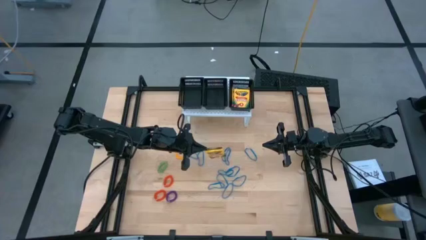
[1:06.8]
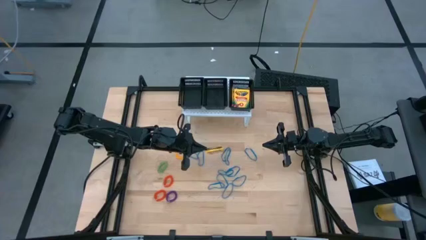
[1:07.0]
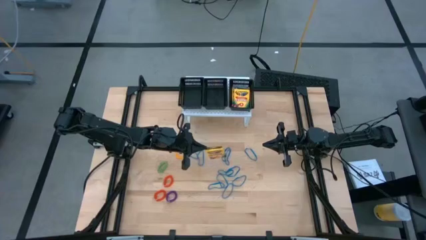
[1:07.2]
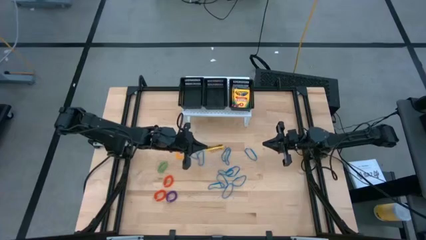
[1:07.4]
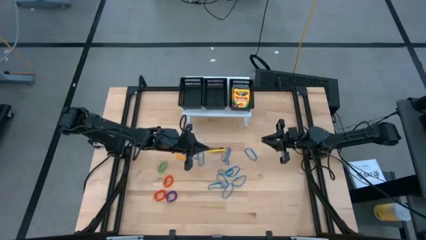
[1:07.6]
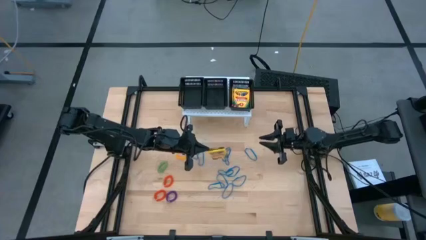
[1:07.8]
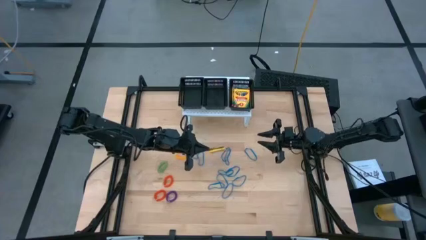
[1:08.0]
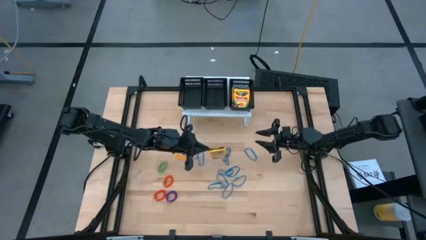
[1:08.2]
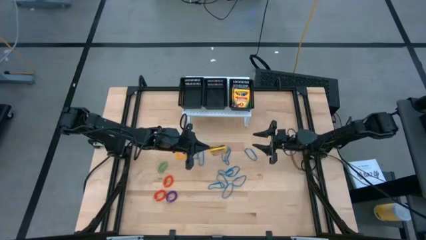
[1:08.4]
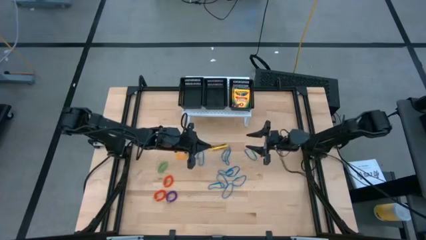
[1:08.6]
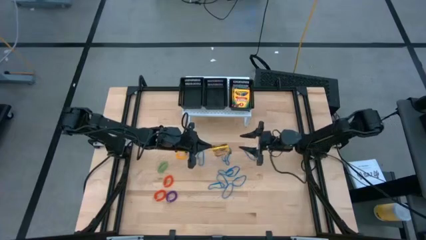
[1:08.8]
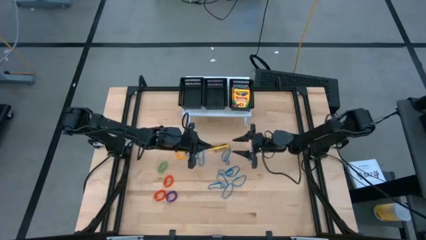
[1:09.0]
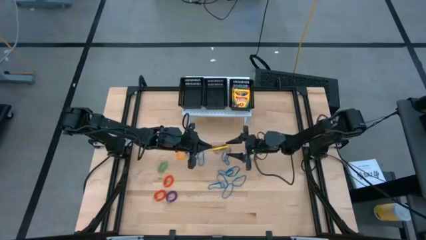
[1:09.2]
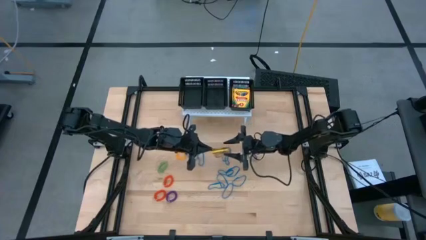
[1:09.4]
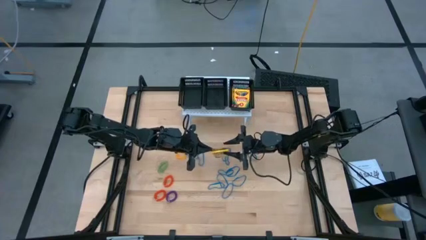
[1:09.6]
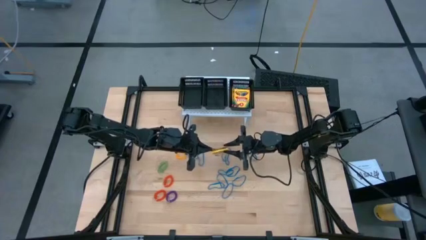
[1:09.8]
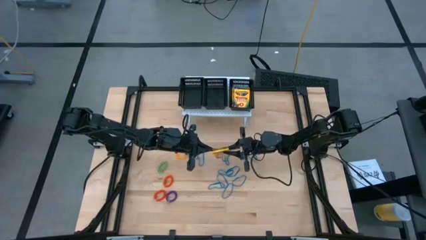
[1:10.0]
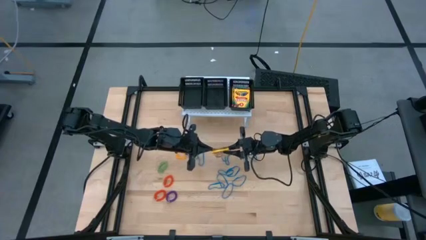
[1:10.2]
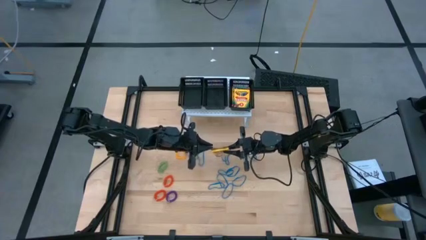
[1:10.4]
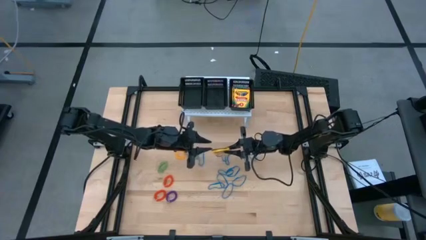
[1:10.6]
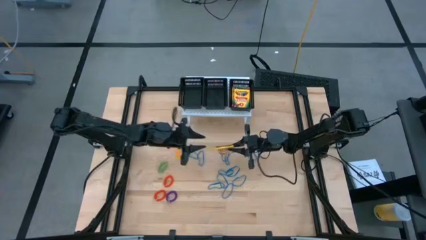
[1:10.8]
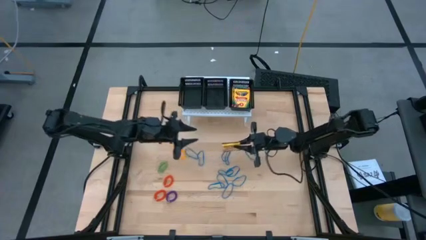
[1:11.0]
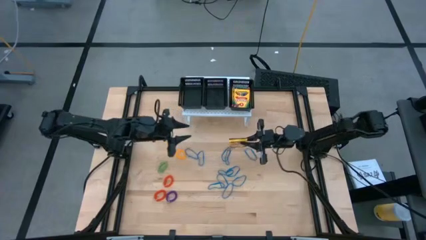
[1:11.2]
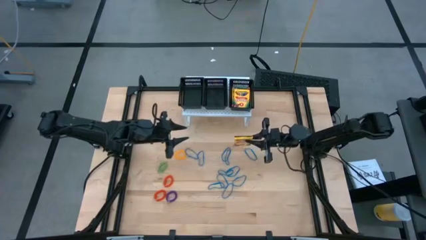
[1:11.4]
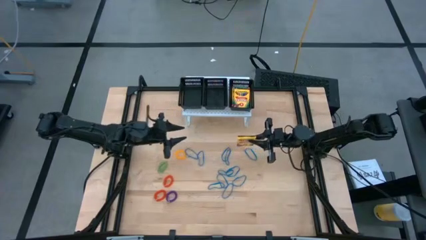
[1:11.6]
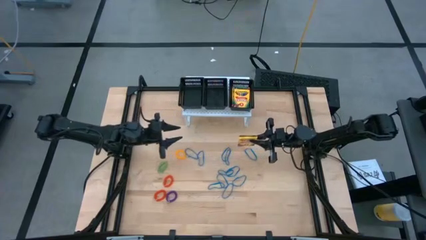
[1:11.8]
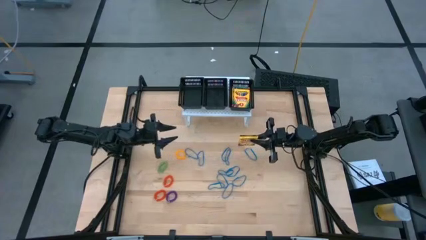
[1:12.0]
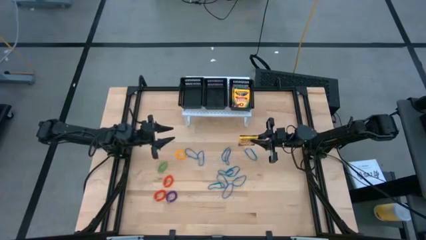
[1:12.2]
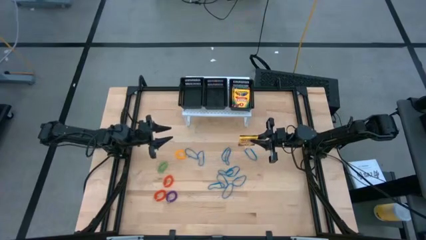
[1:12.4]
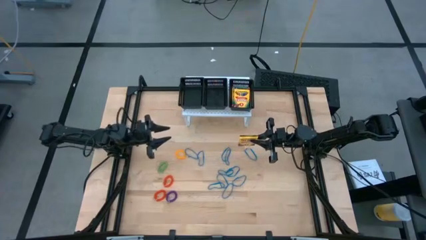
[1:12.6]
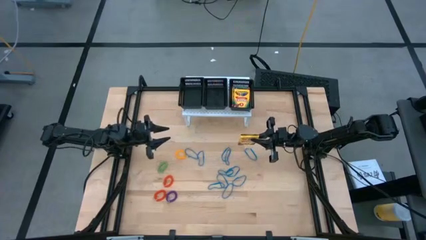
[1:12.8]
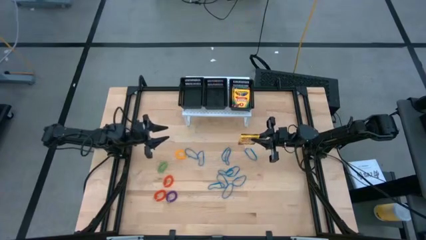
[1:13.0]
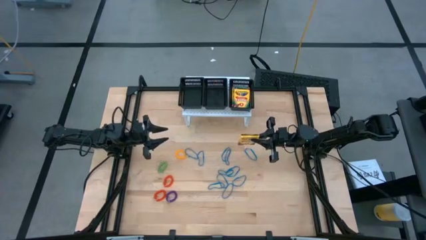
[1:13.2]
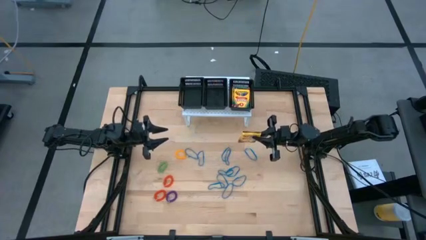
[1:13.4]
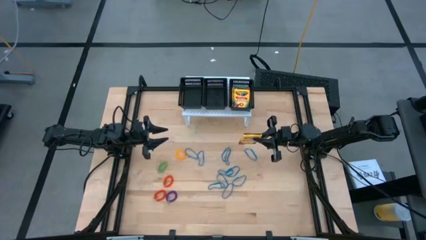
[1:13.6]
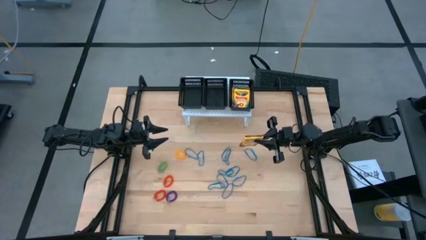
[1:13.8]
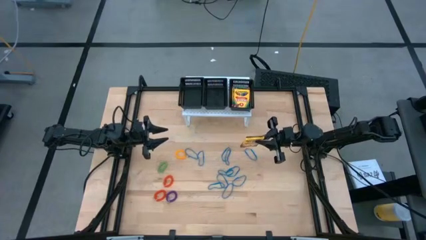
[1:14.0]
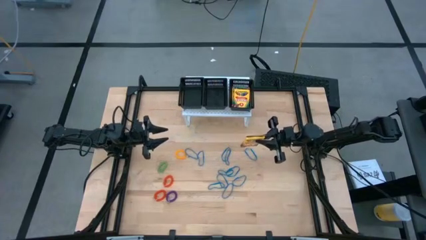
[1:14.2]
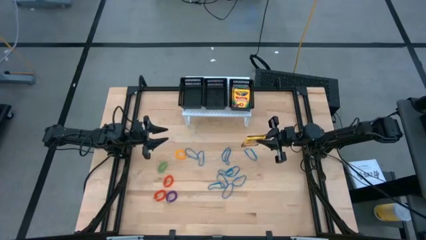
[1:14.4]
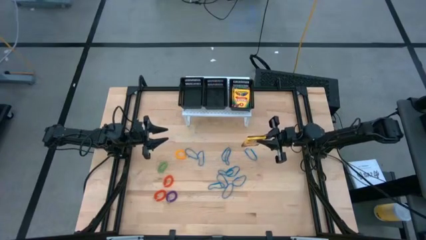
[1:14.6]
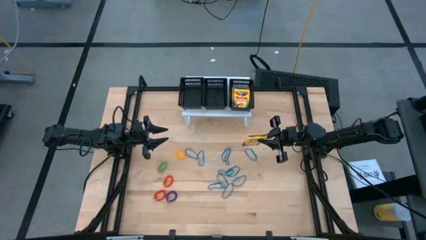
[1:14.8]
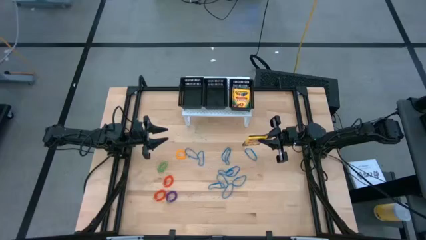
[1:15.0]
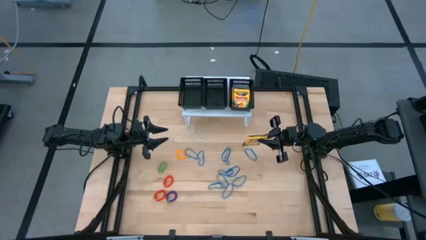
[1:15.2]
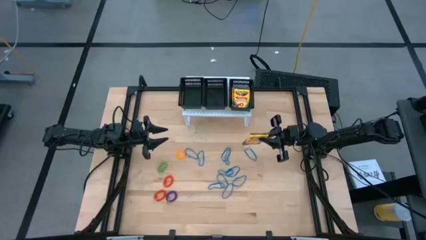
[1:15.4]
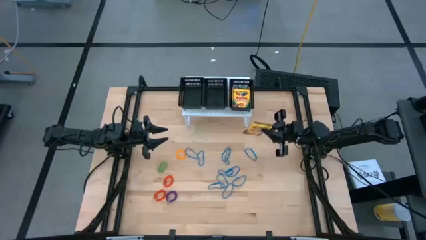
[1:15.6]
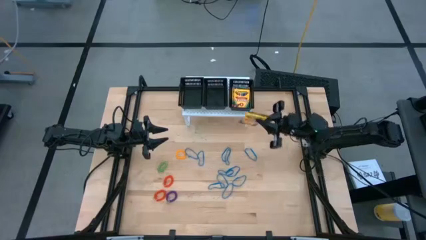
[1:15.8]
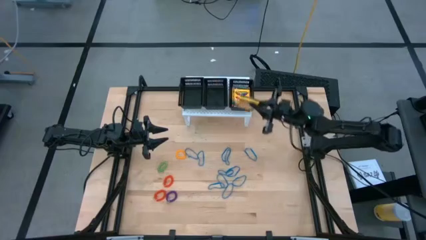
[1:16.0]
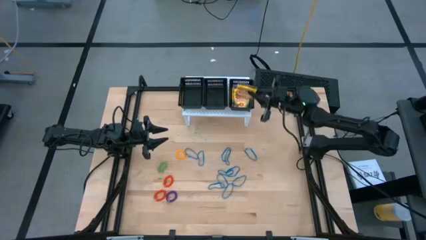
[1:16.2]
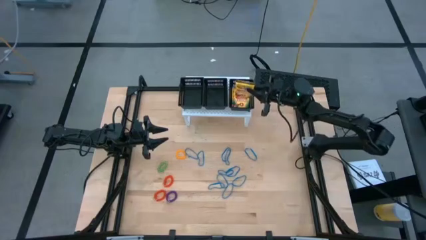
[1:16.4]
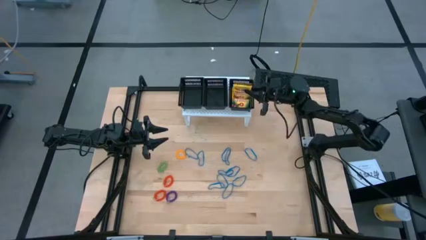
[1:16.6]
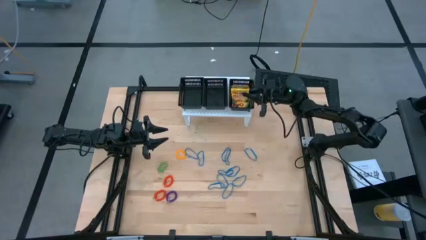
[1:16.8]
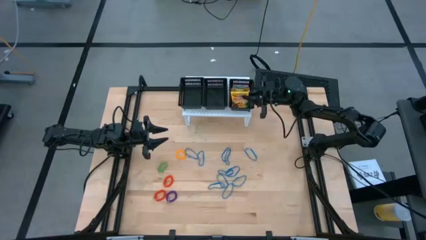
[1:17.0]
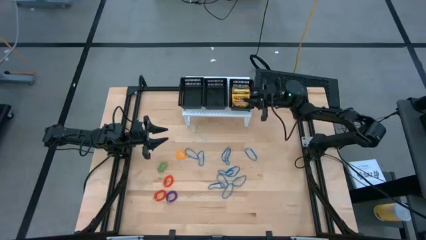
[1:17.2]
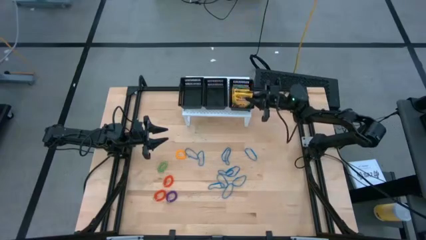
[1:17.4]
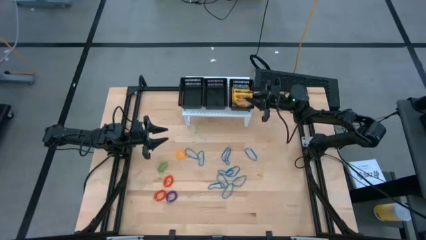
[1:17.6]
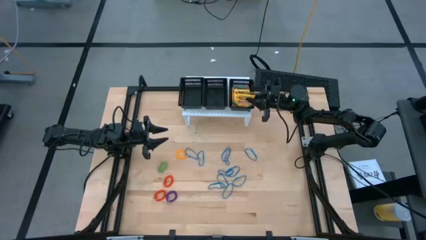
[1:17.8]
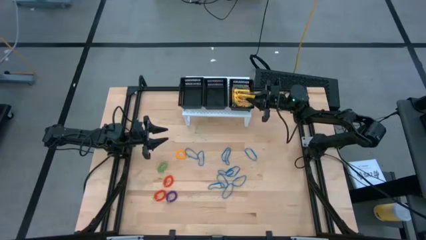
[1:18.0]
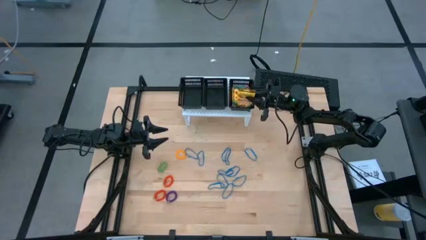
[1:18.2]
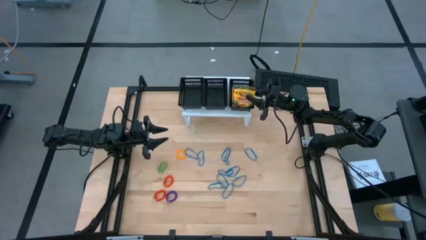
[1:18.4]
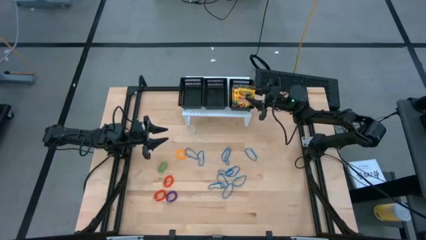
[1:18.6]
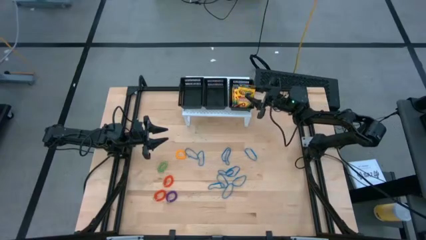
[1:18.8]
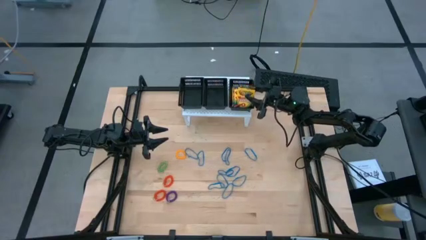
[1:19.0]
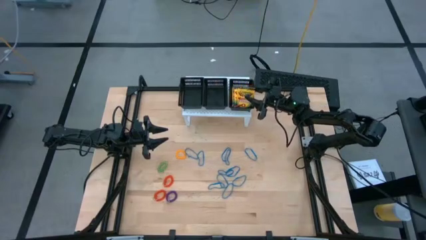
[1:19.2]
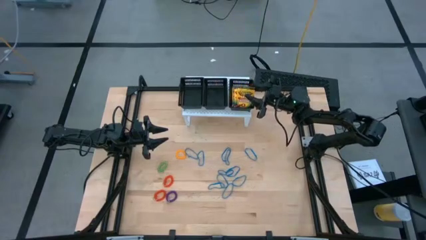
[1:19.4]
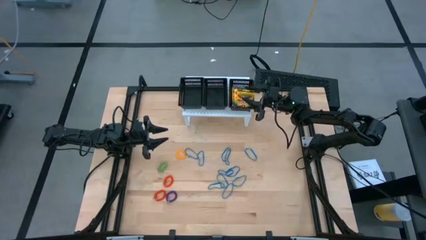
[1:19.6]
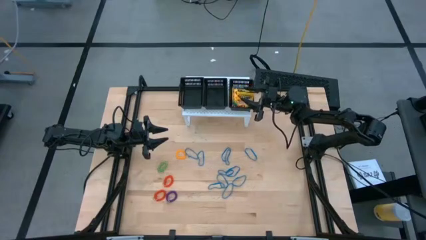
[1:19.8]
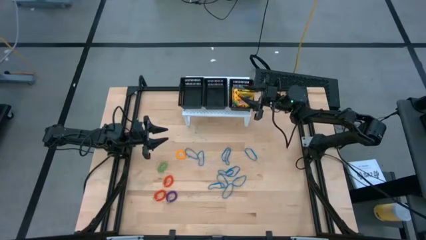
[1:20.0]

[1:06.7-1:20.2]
Task: Pick & Place Office Desk Supplies
Put the crayon box into the right black bin
